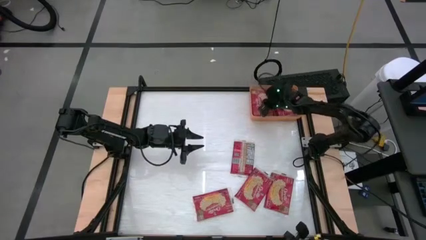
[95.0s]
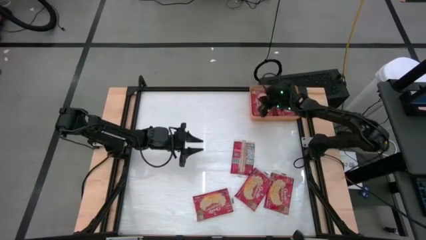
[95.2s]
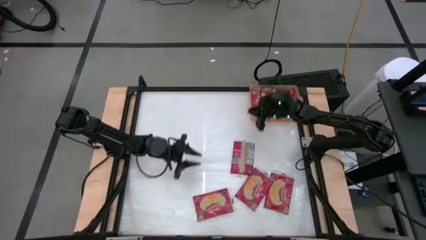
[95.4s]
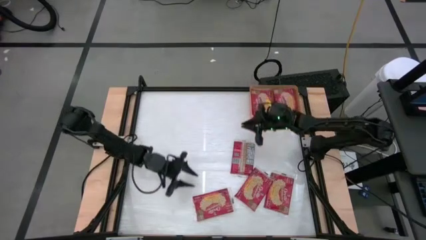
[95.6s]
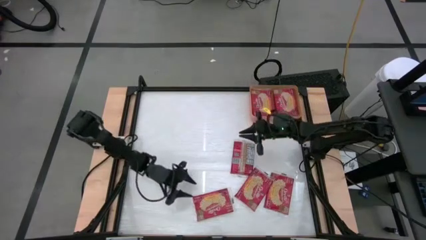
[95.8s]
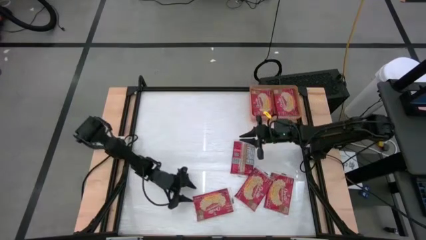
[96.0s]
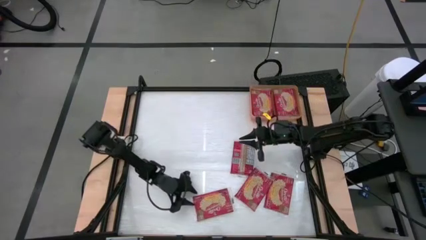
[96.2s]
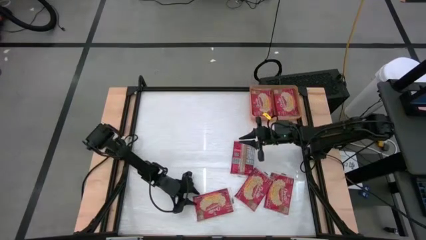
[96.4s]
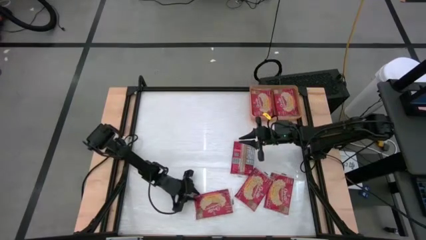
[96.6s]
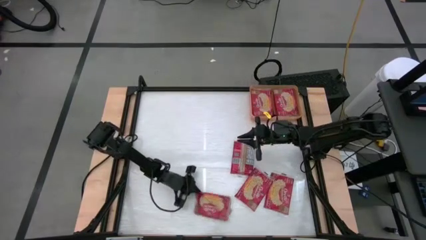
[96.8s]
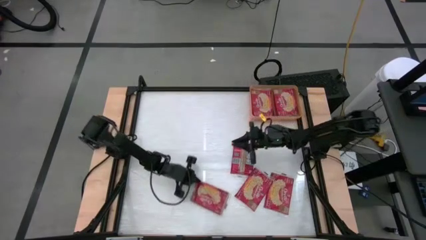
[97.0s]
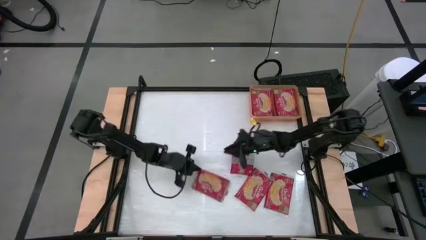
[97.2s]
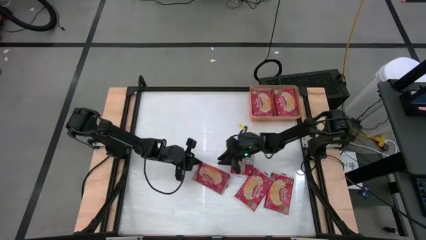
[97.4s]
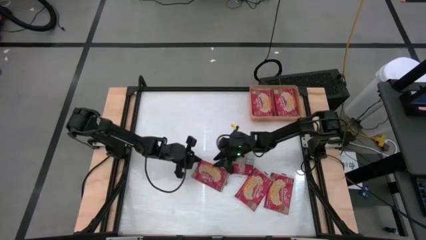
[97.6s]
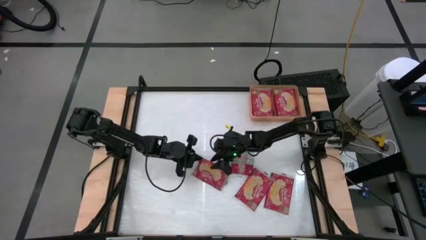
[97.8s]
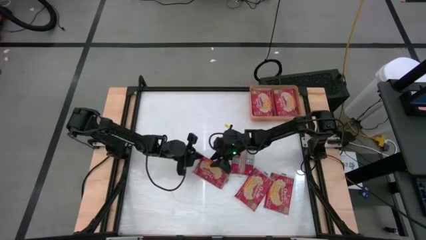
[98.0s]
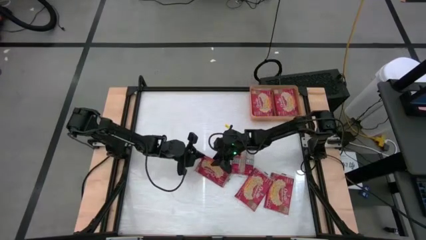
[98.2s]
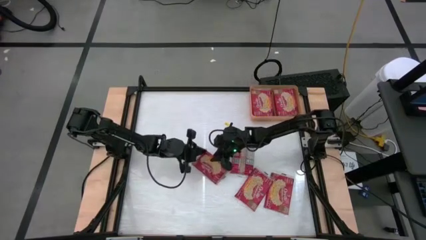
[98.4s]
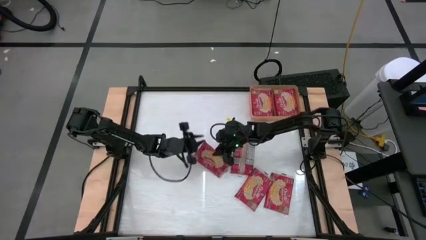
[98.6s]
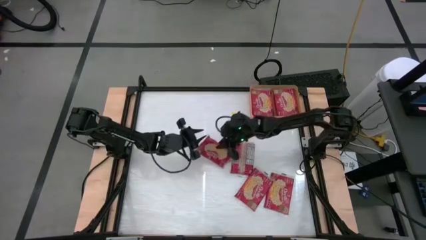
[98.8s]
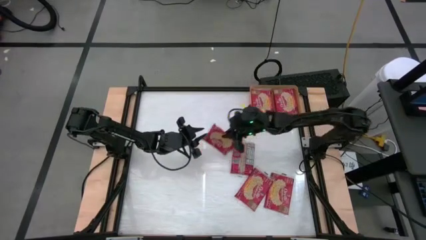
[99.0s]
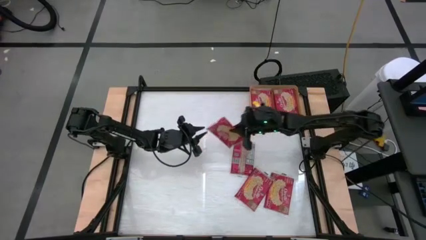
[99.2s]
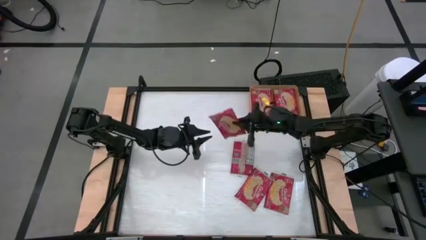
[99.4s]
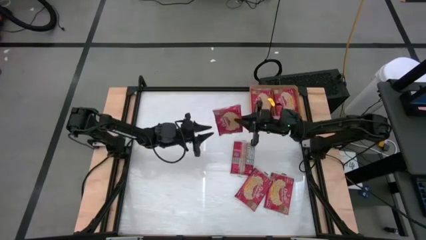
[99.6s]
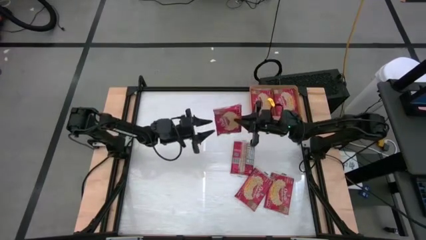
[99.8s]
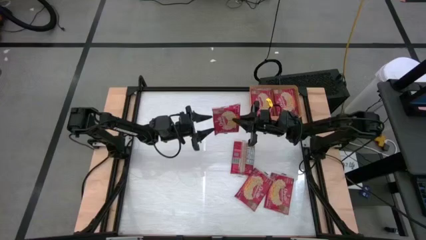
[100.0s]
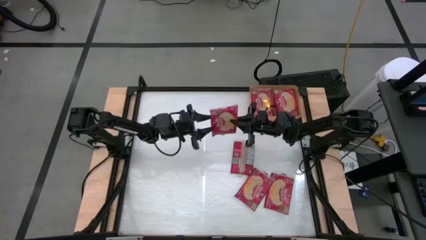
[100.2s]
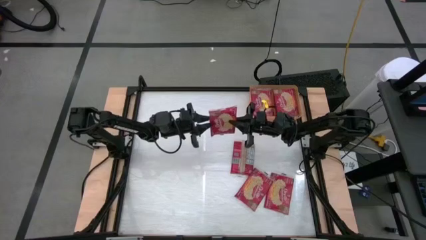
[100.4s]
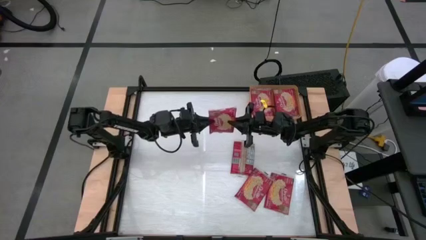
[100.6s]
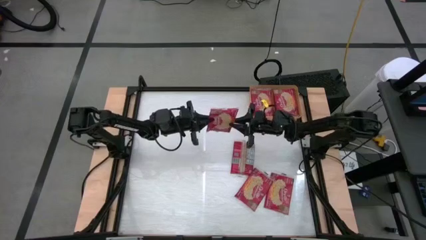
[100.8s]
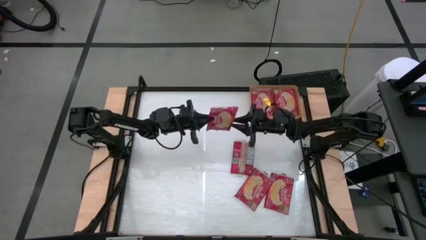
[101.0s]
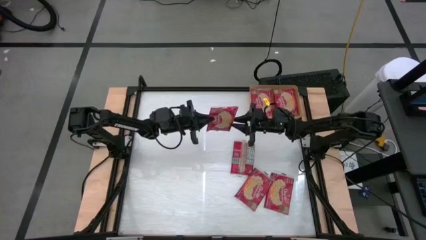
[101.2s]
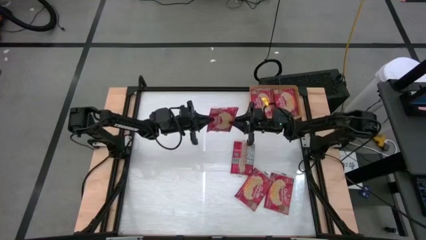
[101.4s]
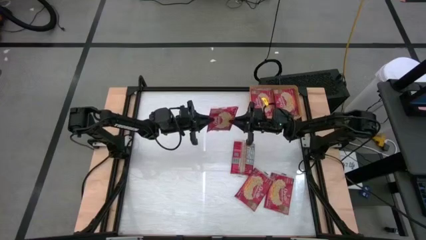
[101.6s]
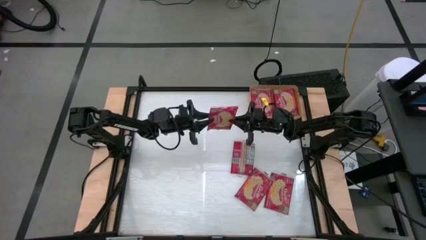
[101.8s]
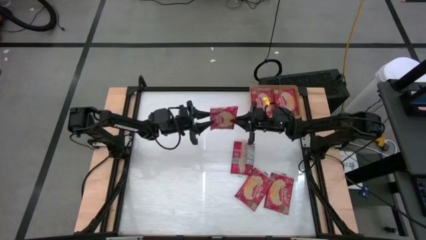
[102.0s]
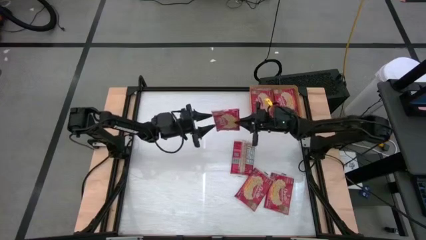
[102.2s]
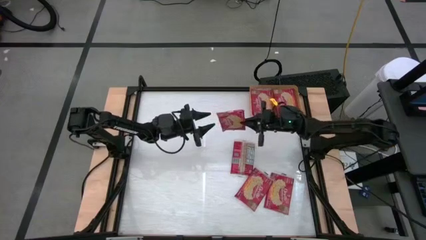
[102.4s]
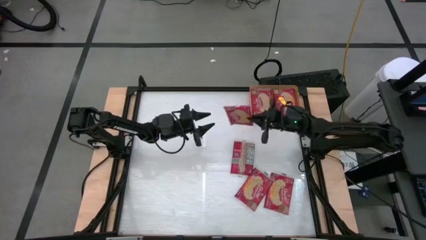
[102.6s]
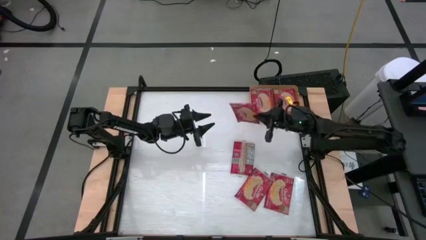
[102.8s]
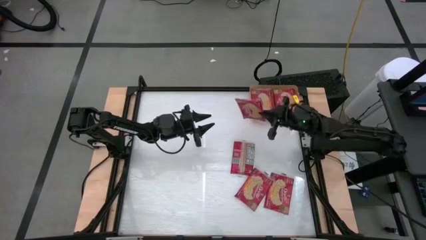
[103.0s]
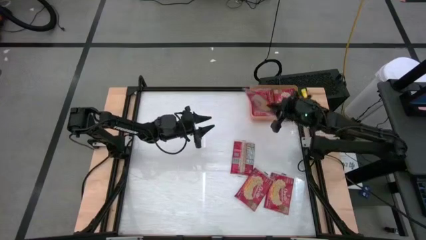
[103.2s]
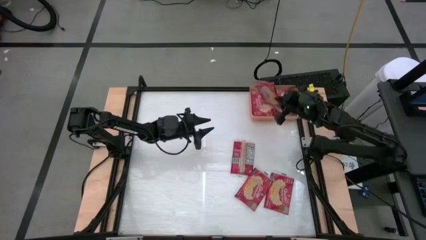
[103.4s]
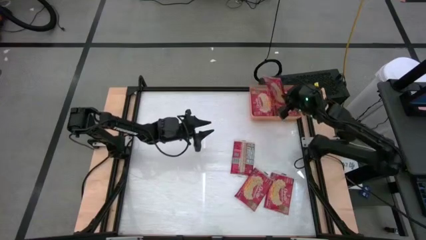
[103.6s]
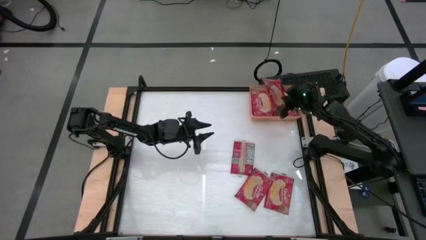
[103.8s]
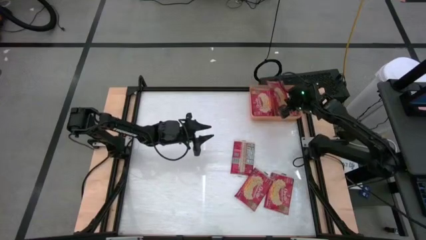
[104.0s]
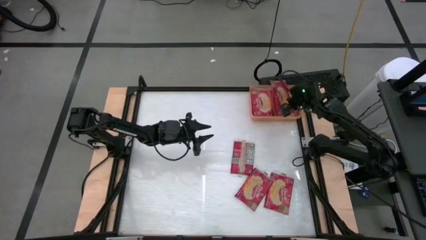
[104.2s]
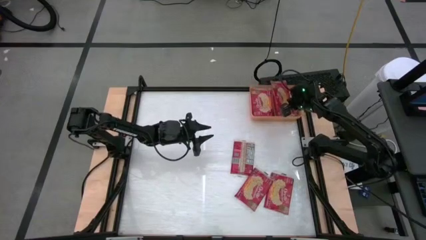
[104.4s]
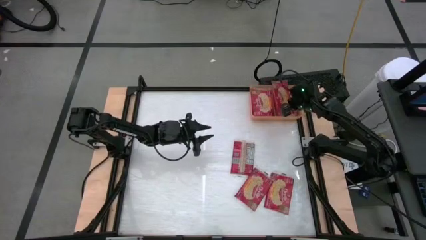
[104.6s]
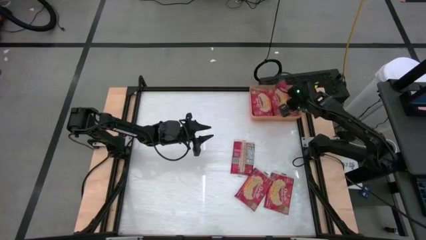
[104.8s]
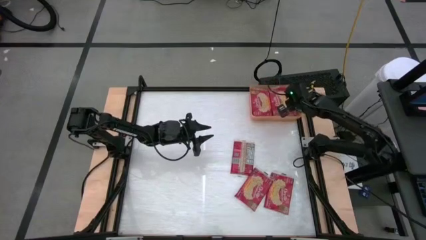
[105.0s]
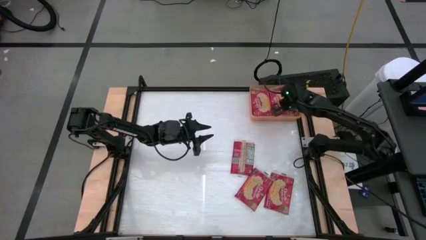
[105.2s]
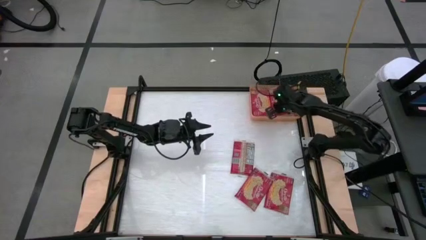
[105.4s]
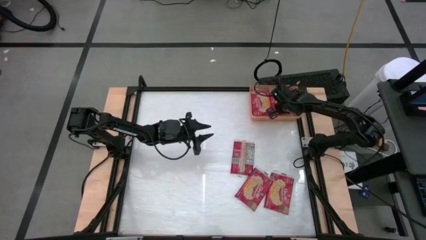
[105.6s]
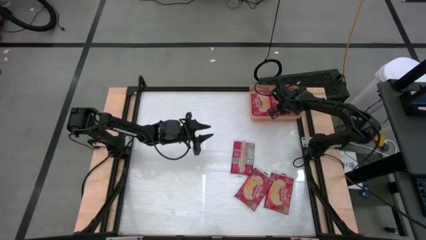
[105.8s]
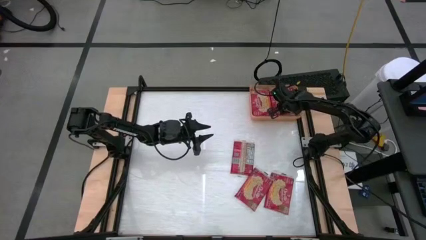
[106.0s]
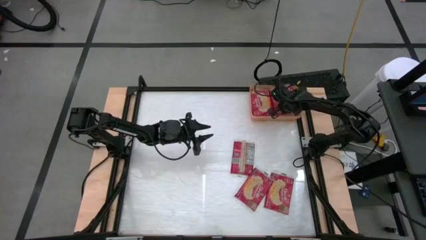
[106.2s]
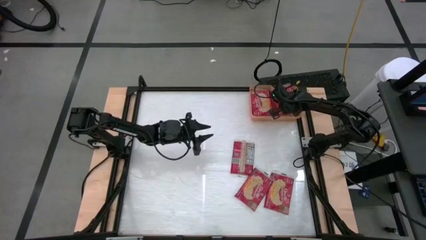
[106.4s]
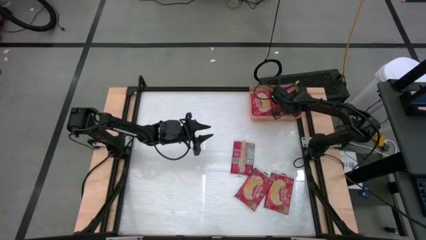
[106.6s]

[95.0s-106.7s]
Task: Sort popcorn bags into baskets
Put the red popcorn bag into the orange bin

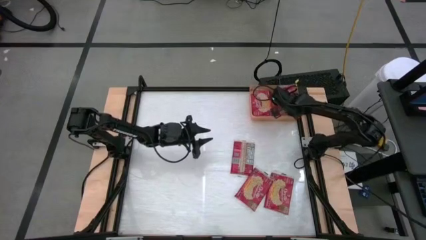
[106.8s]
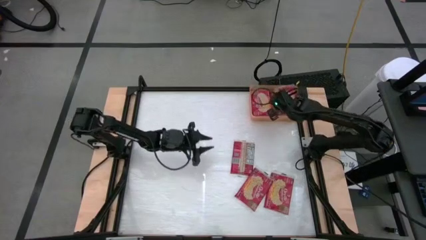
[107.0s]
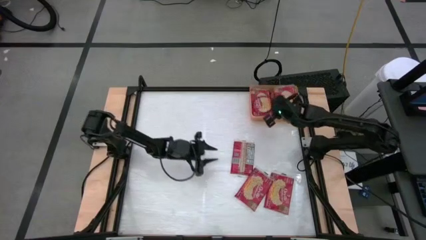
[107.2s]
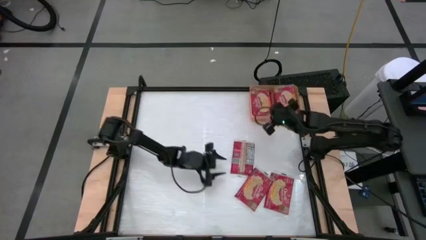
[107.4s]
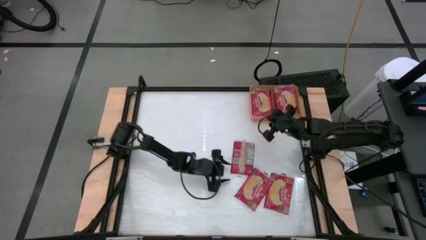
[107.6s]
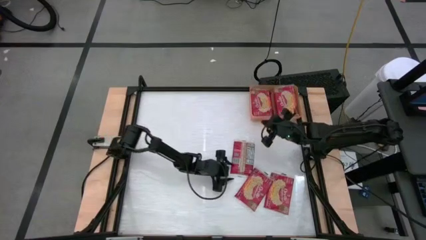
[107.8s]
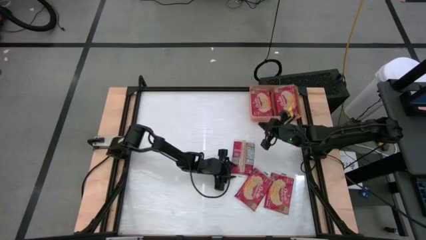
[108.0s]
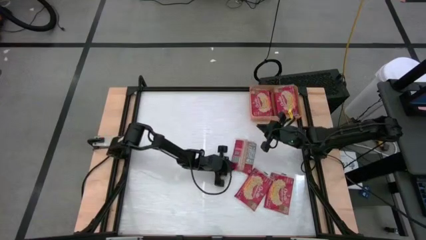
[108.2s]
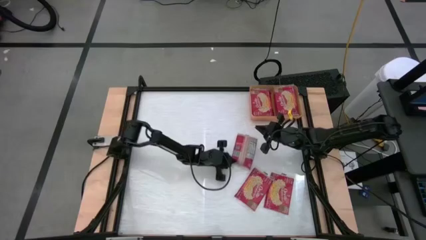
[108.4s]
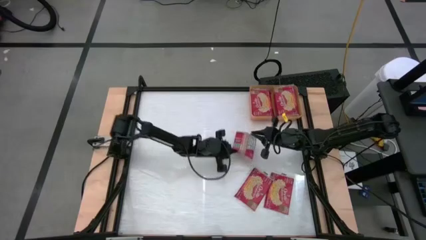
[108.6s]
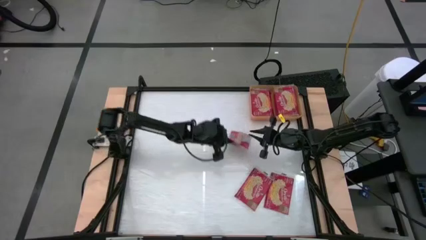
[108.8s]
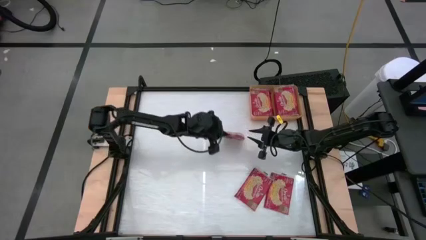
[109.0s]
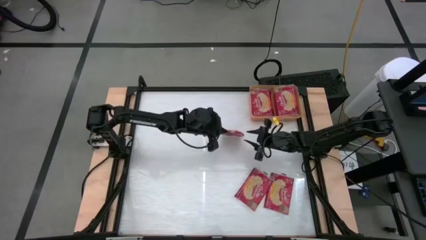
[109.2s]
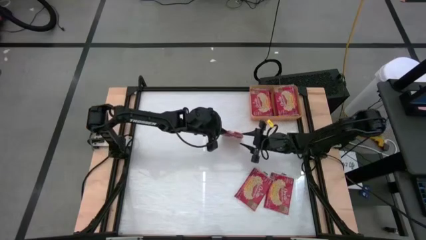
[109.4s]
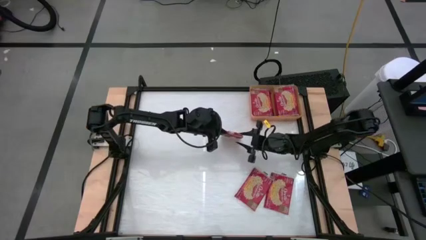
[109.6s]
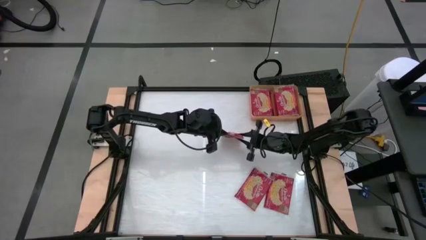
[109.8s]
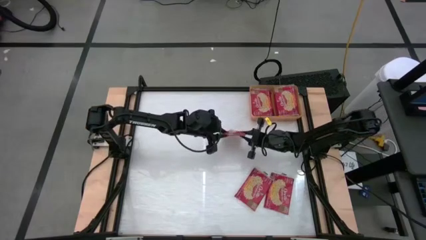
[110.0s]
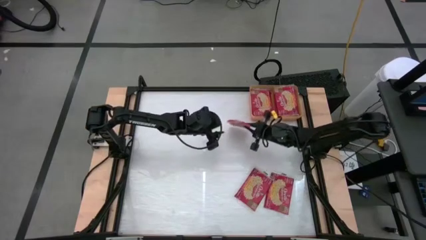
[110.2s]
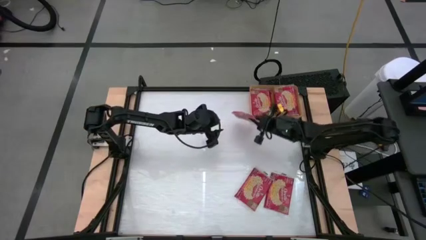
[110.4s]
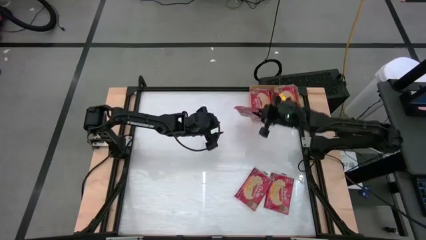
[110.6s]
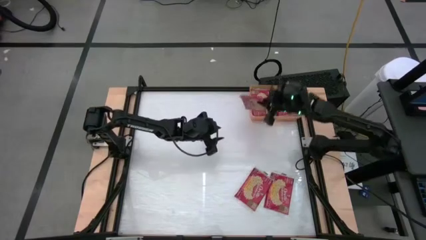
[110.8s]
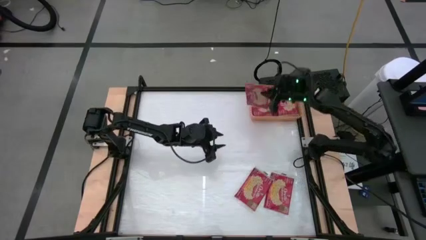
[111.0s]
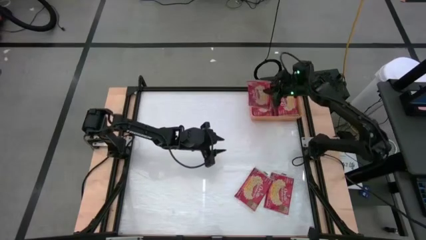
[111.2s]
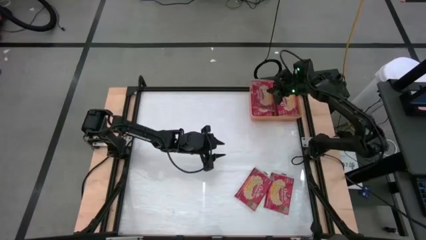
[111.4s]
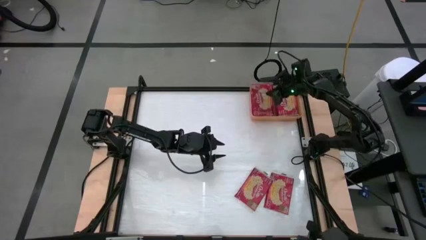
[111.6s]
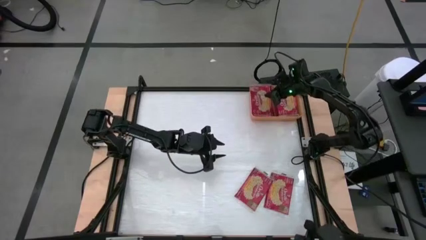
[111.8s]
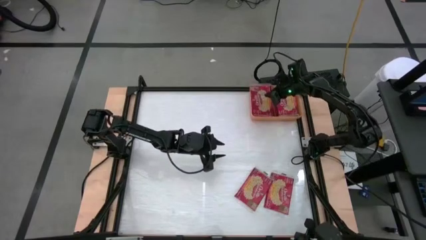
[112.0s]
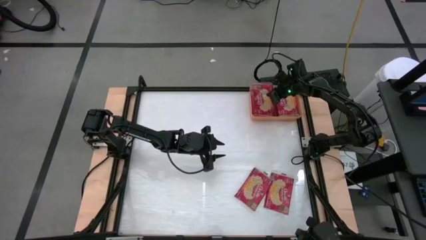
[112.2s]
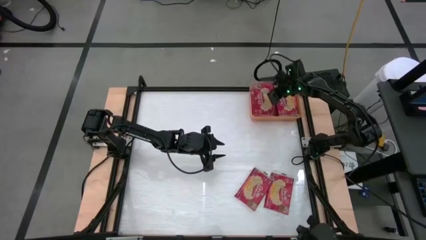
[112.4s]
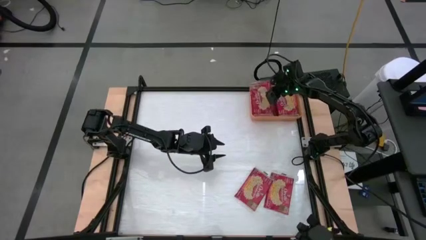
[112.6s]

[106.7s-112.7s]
Put the red popcorn bag into the orange bin
